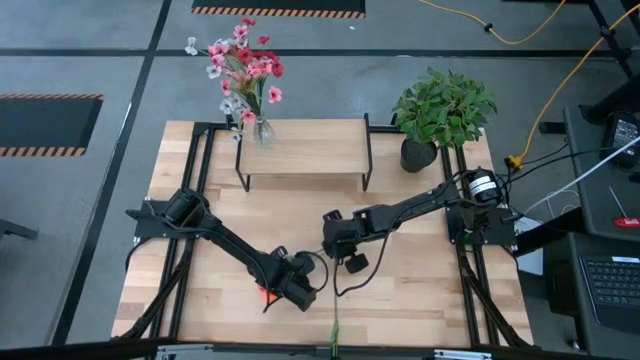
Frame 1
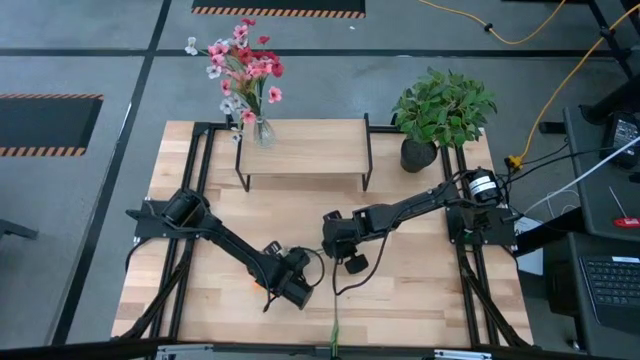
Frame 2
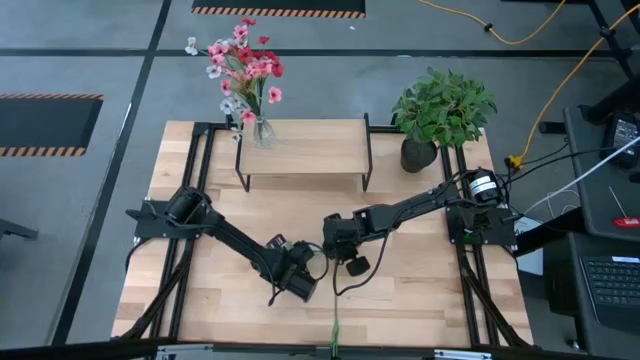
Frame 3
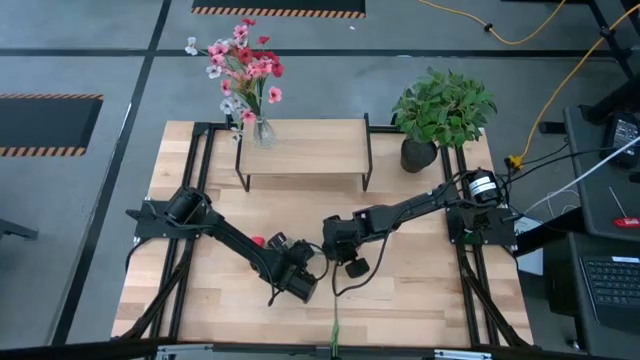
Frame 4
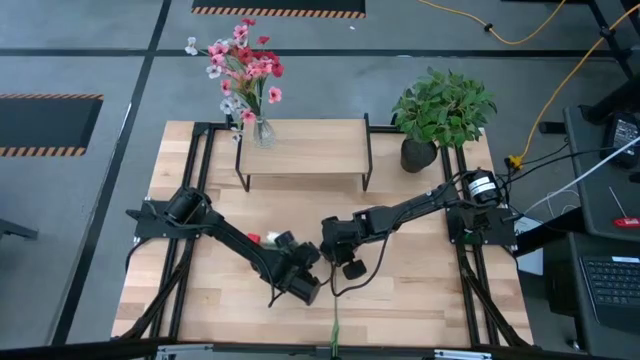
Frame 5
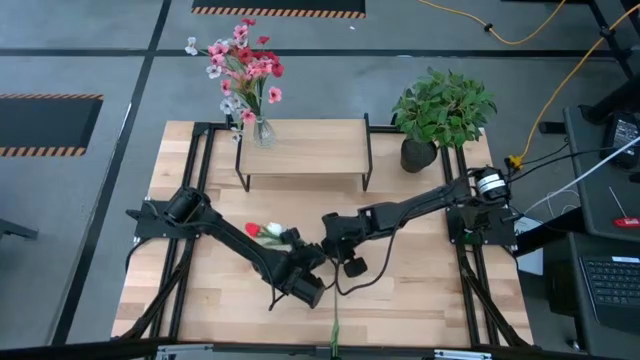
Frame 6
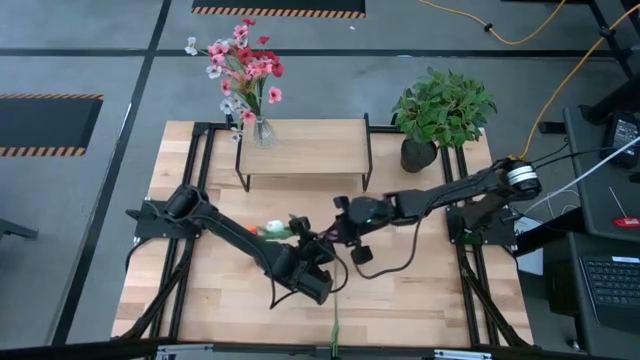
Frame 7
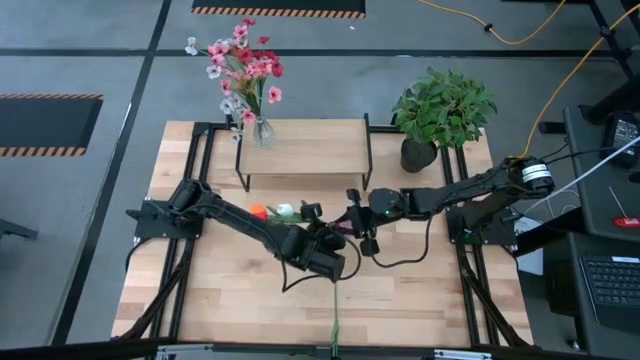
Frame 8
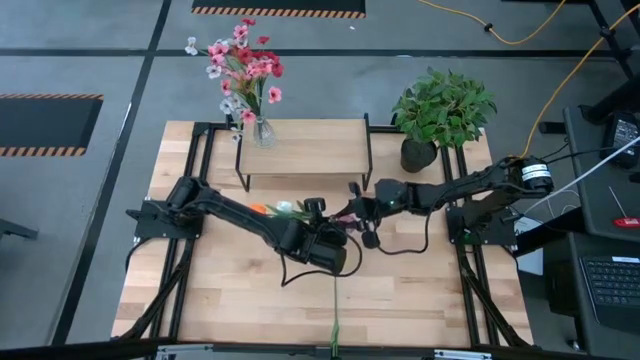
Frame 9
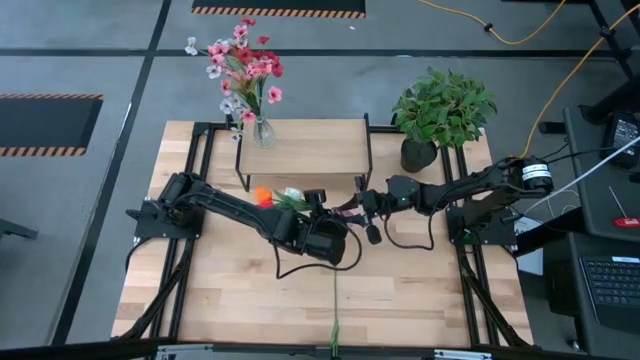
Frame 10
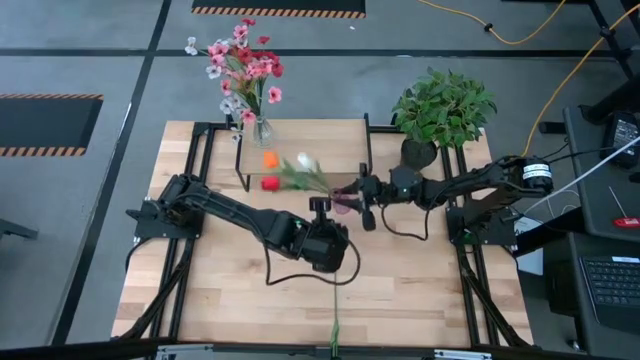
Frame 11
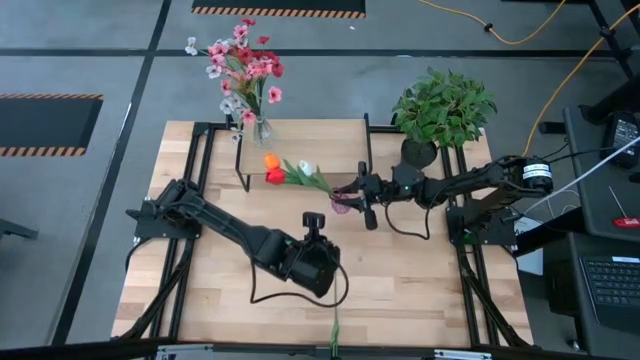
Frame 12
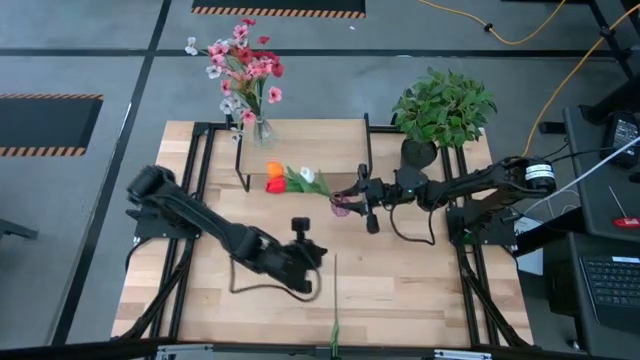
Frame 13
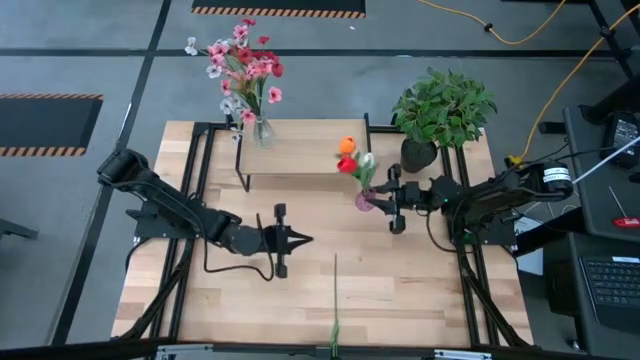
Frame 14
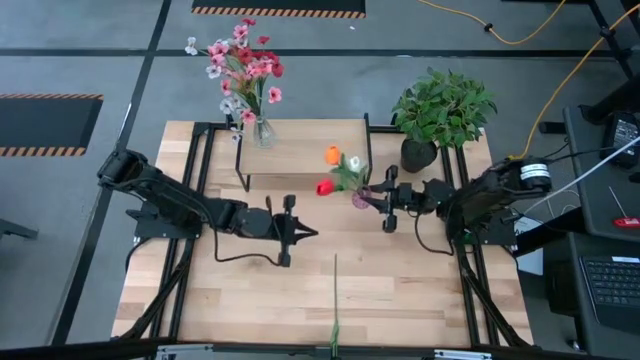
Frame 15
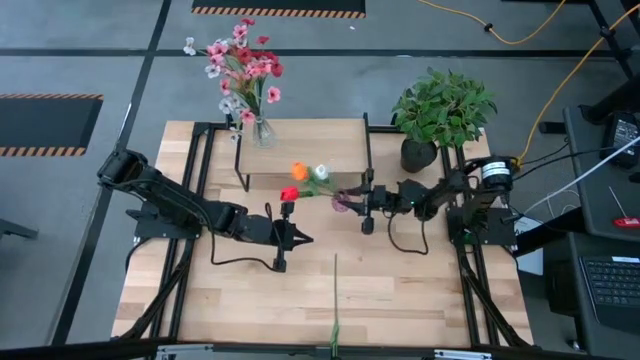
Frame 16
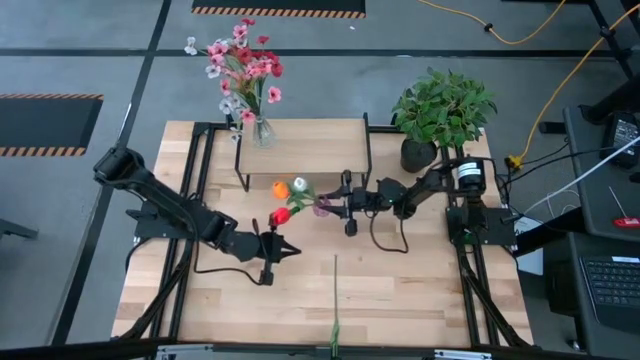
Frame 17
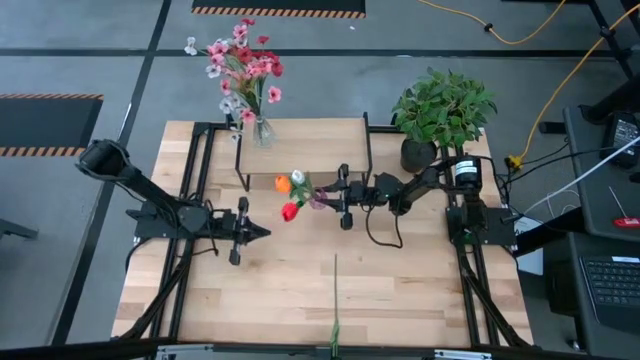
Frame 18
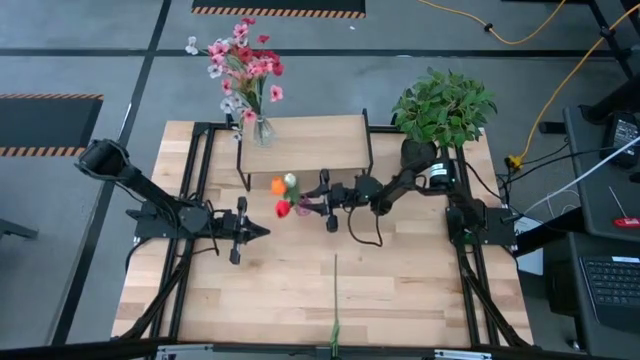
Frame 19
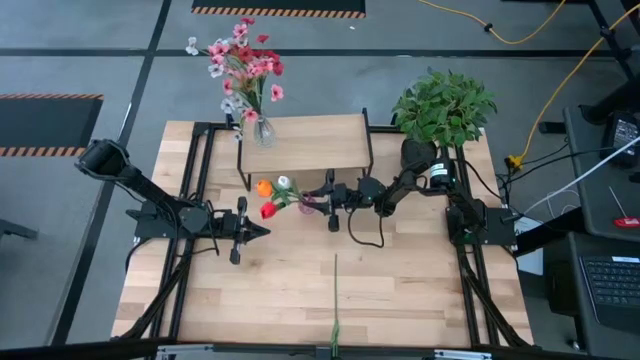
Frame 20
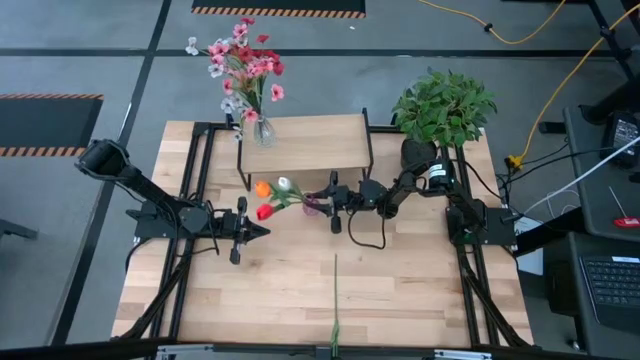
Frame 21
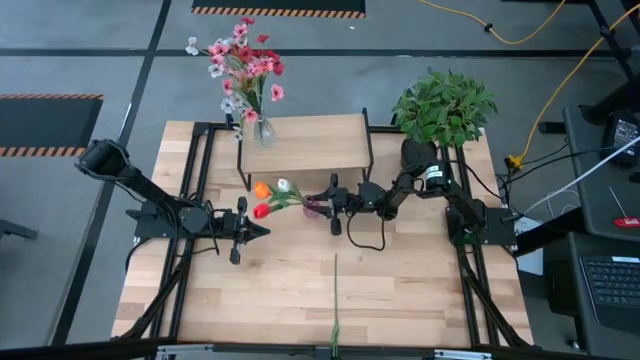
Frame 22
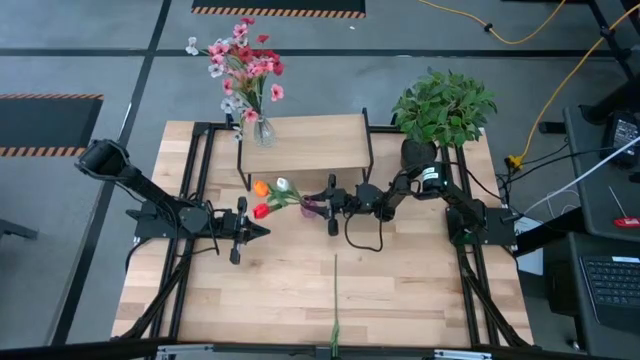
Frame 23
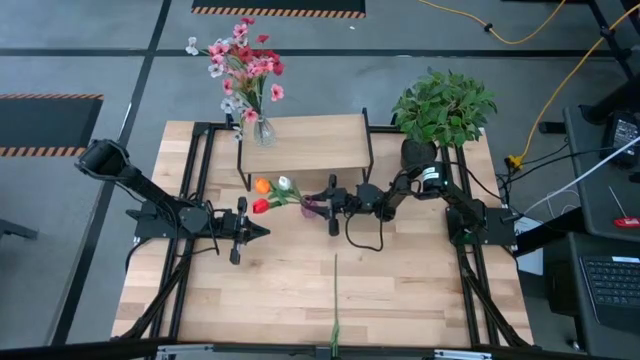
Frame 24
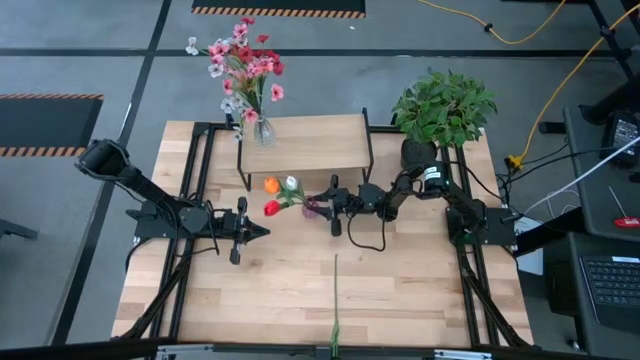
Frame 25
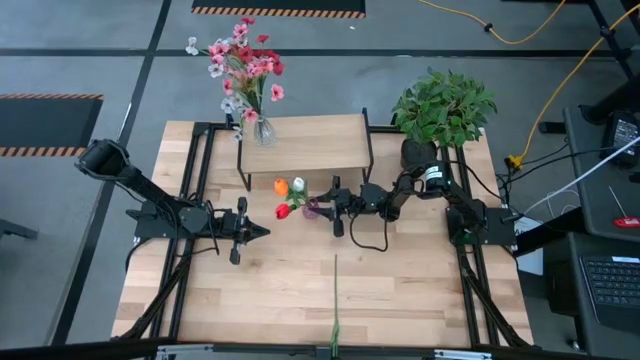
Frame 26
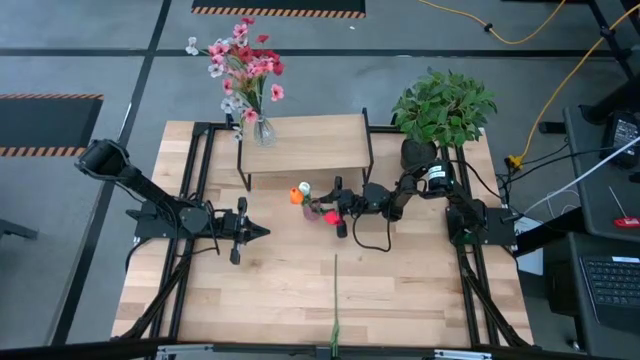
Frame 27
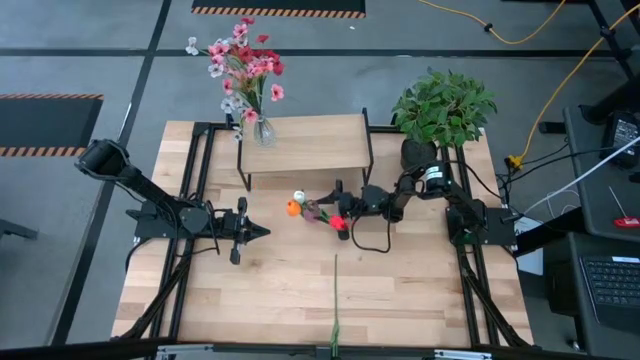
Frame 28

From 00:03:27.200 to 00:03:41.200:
Task: Pick and place flowers into a vace then onto a shelf
Move the pink vase to the middle of the table

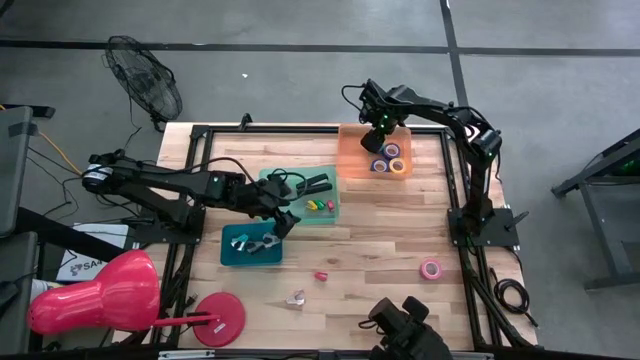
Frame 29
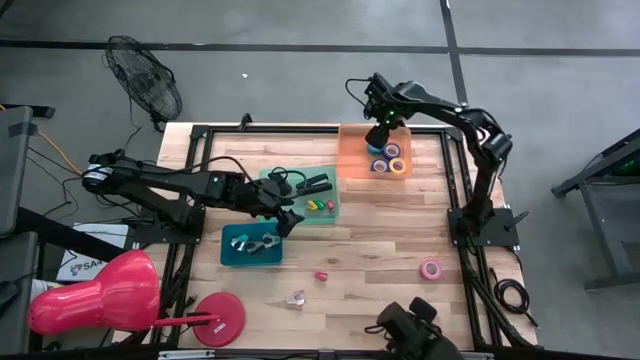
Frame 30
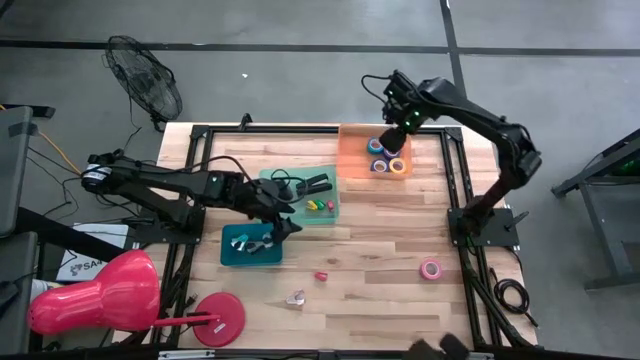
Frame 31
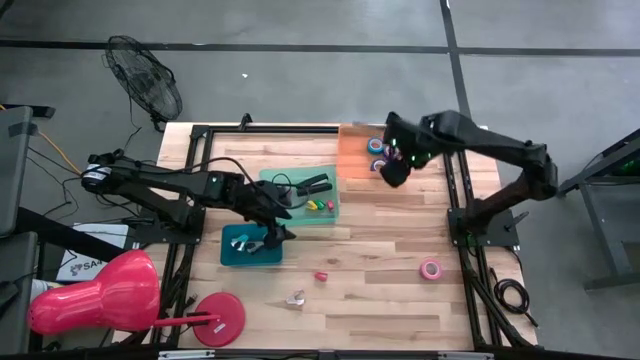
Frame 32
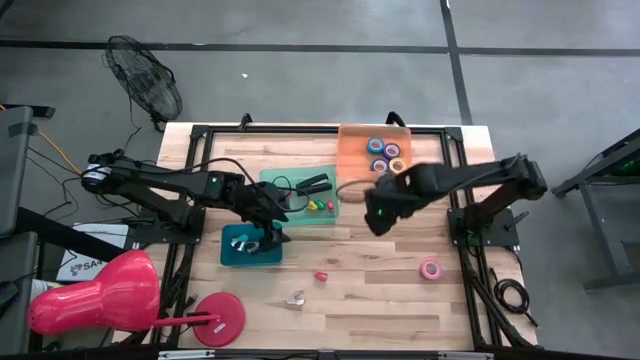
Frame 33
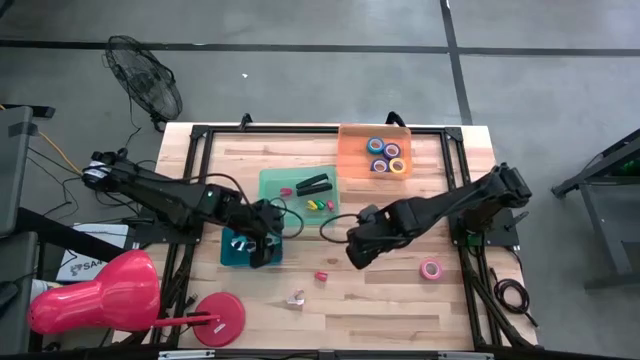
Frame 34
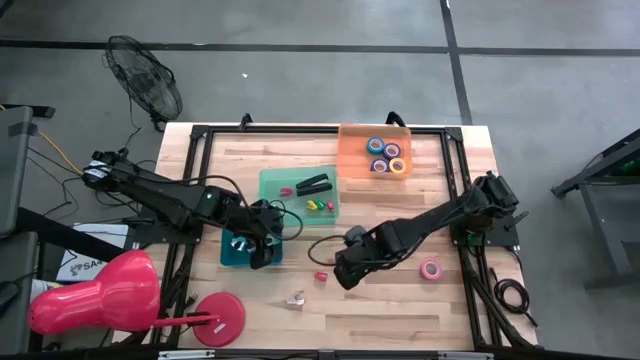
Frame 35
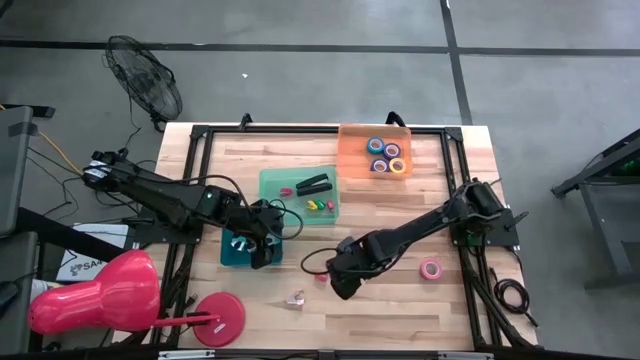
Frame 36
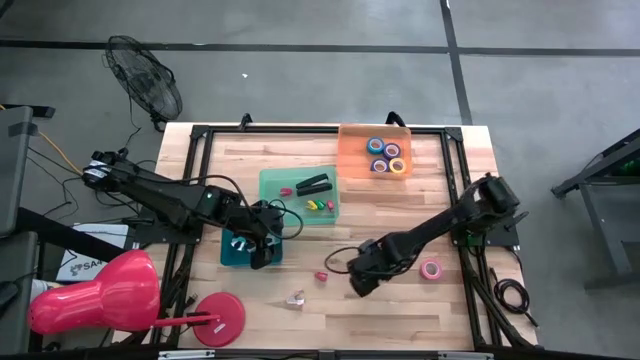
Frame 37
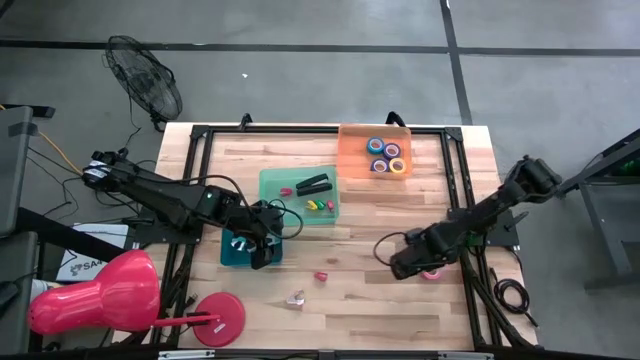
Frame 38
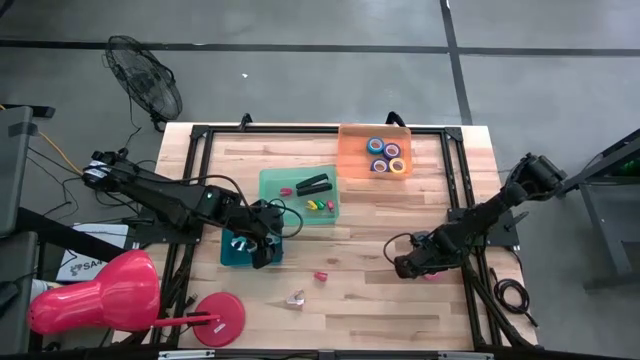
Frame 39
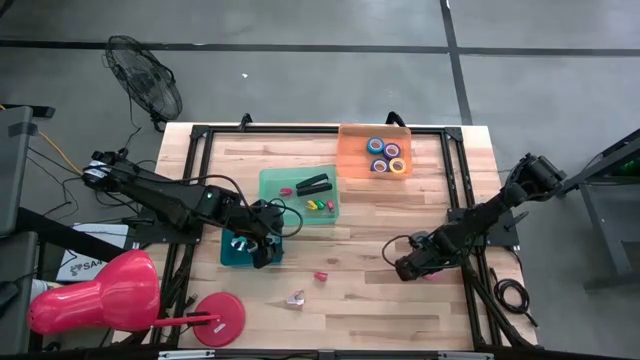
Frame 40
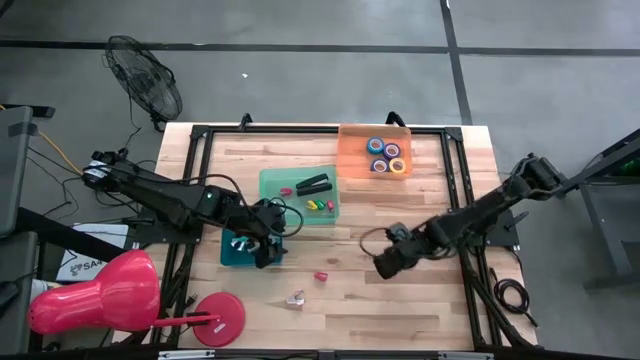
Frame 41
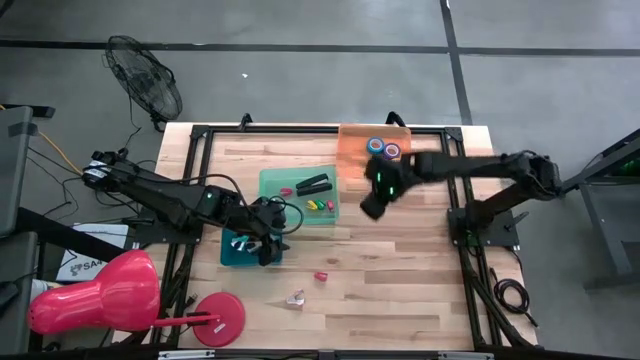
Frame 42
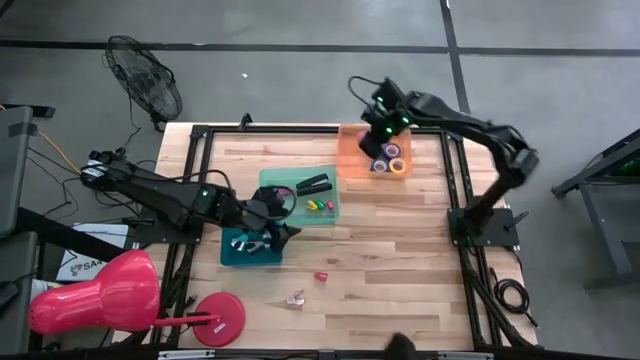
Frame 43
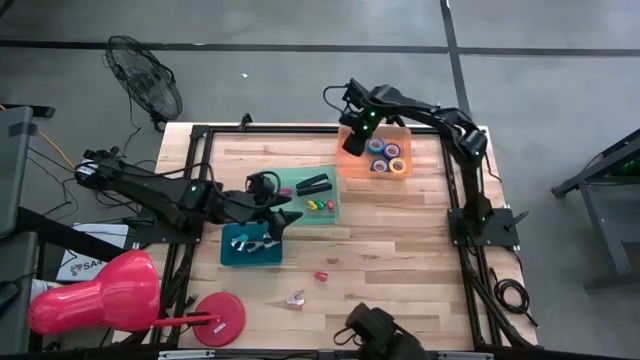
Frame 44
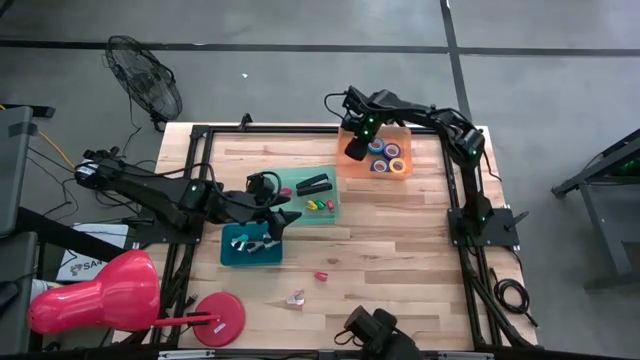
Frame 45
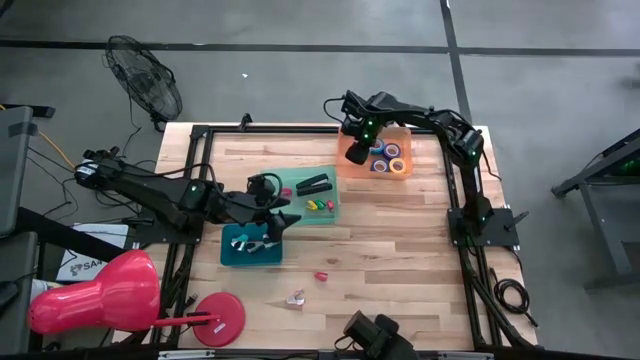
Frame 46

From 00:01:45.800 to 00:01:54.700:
Task: Pick and place Stapler, Stapler remover, tape
Put the pink tape in the orange bin
